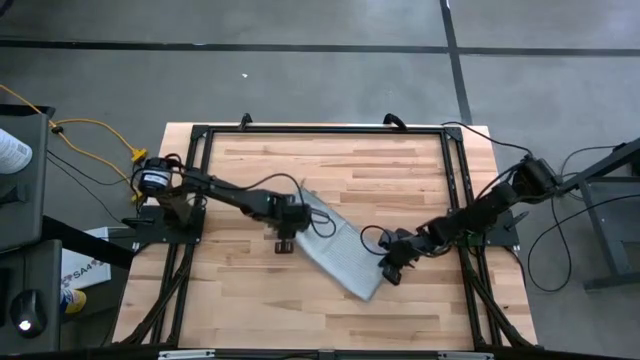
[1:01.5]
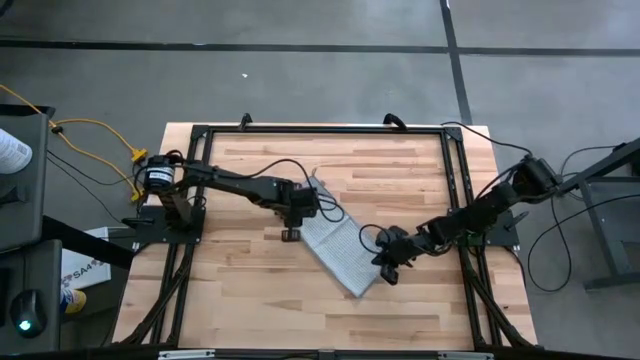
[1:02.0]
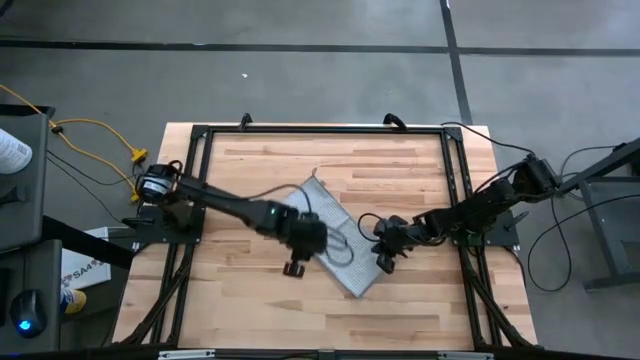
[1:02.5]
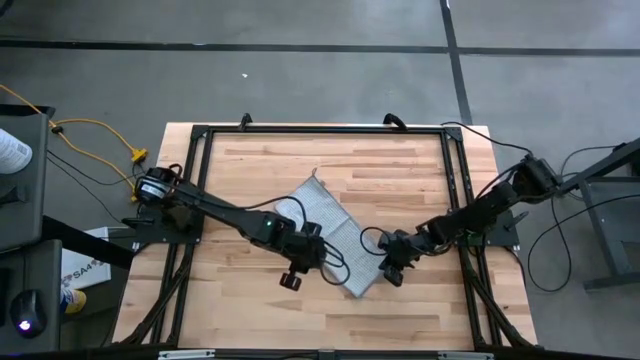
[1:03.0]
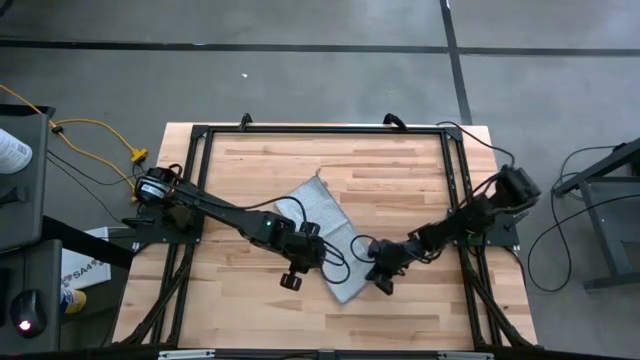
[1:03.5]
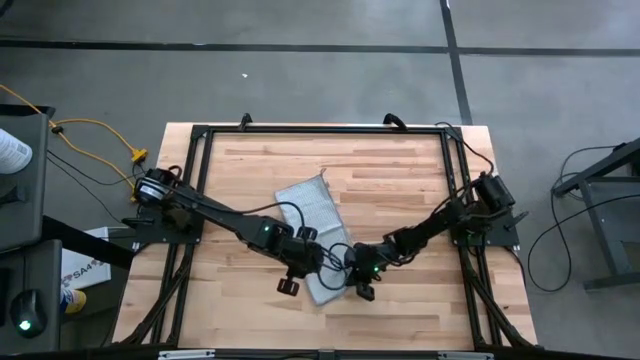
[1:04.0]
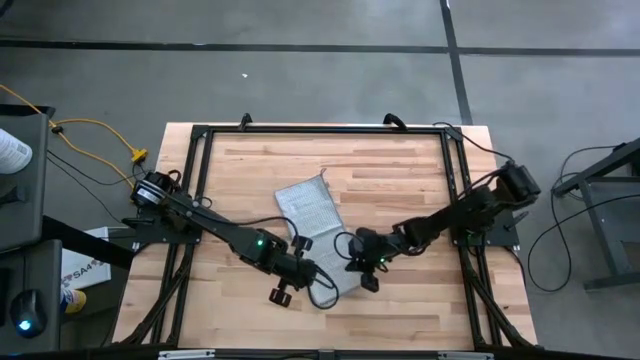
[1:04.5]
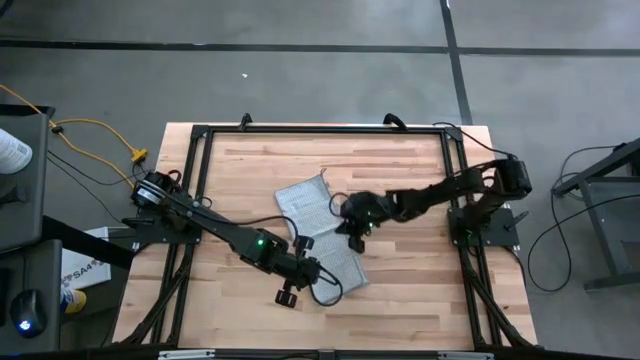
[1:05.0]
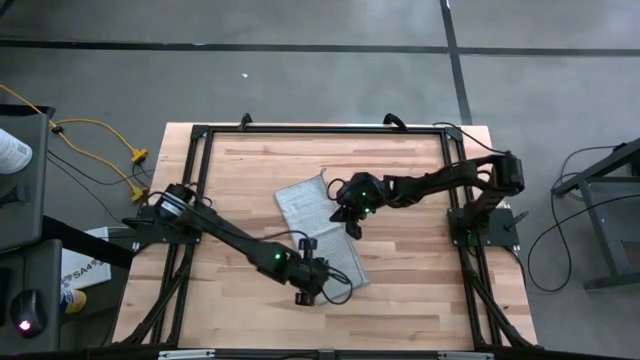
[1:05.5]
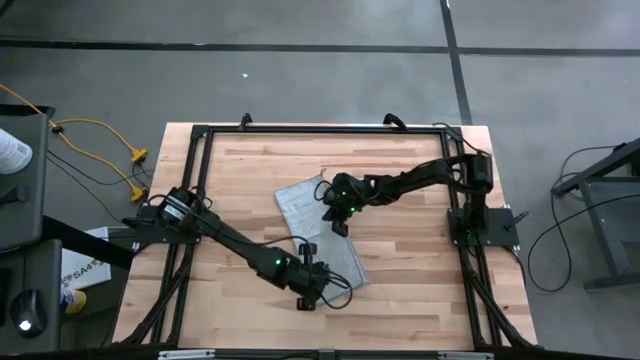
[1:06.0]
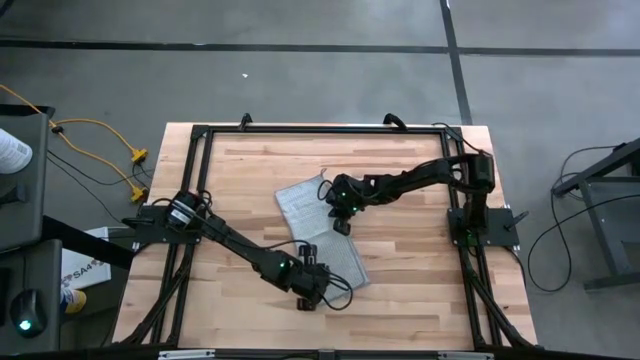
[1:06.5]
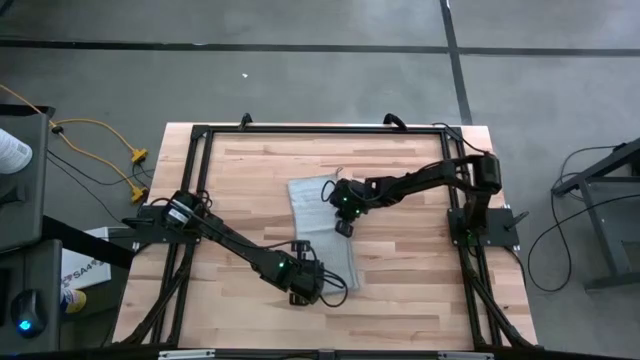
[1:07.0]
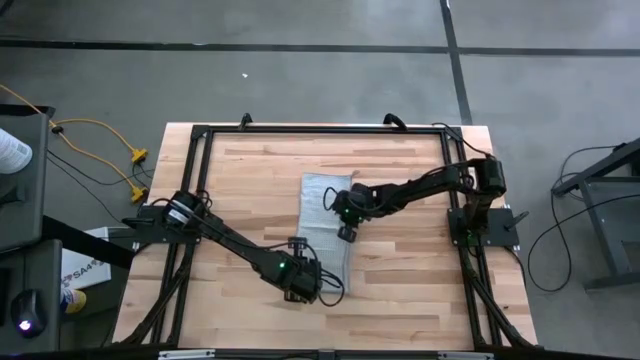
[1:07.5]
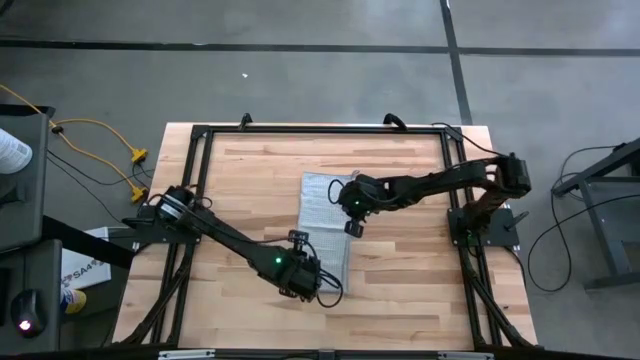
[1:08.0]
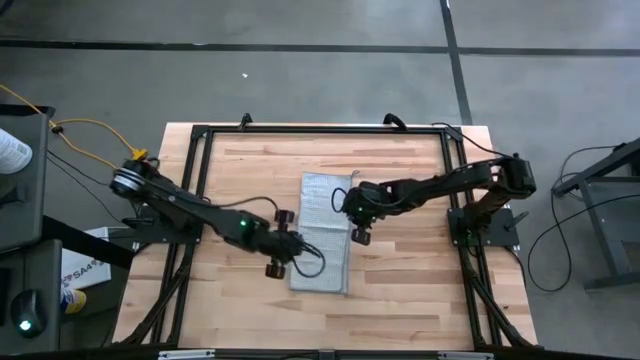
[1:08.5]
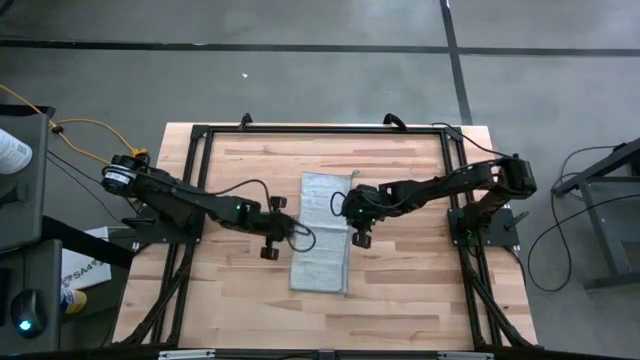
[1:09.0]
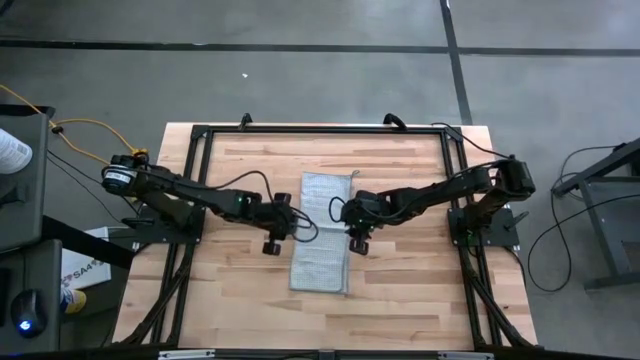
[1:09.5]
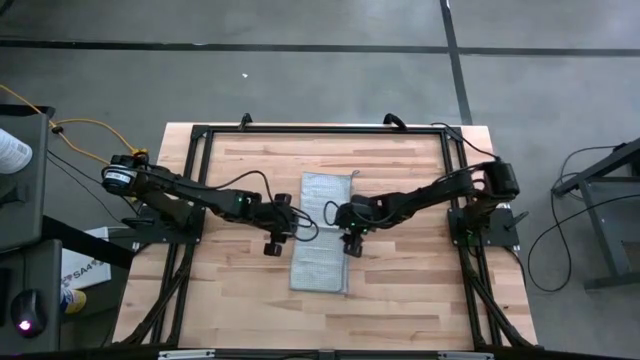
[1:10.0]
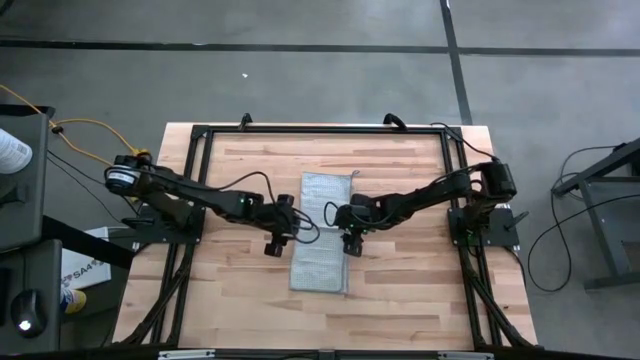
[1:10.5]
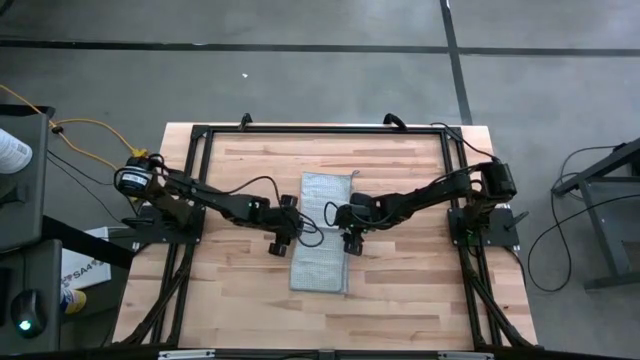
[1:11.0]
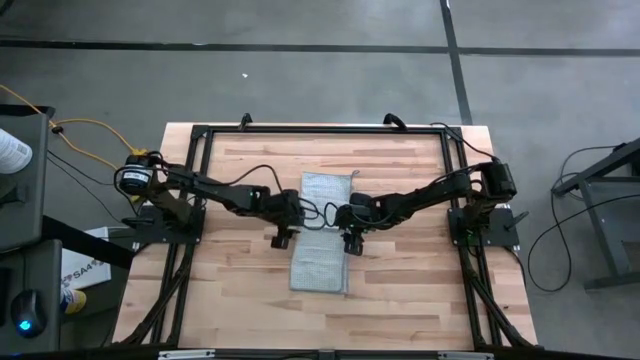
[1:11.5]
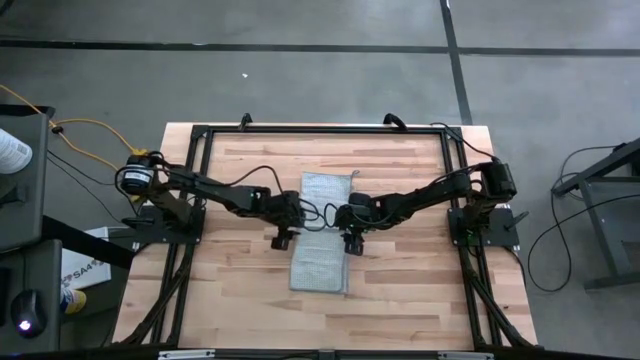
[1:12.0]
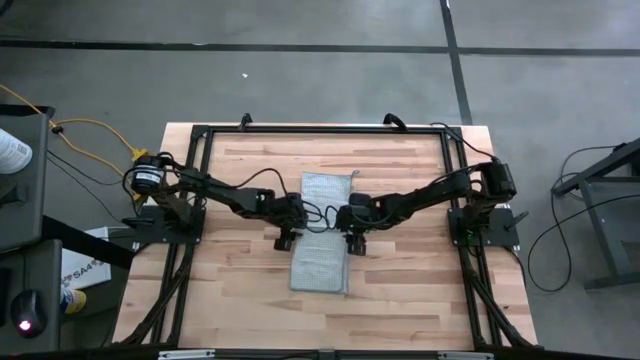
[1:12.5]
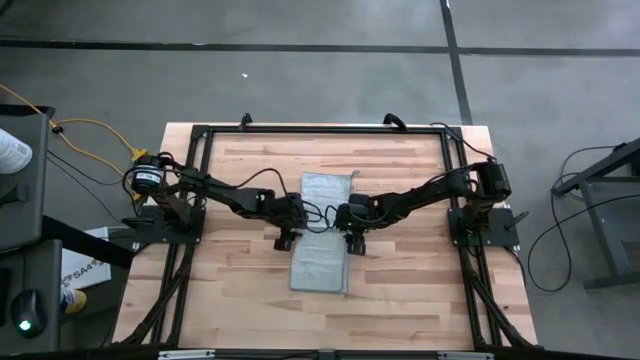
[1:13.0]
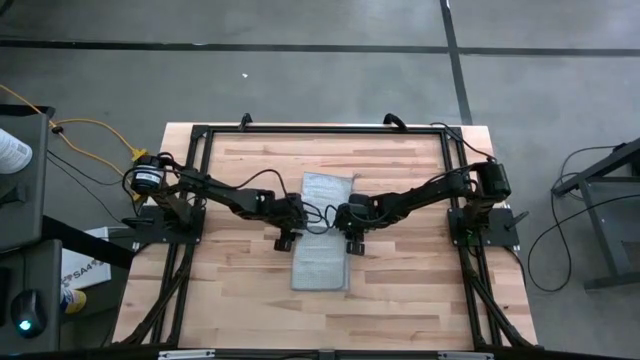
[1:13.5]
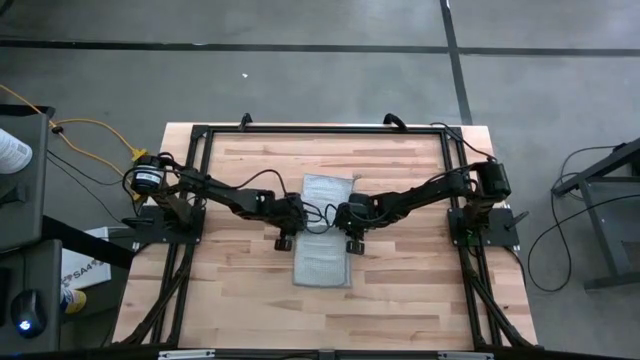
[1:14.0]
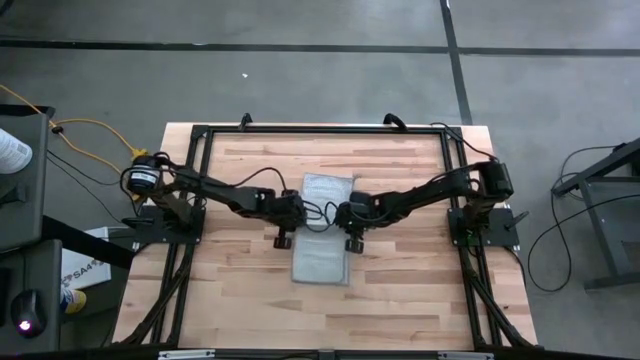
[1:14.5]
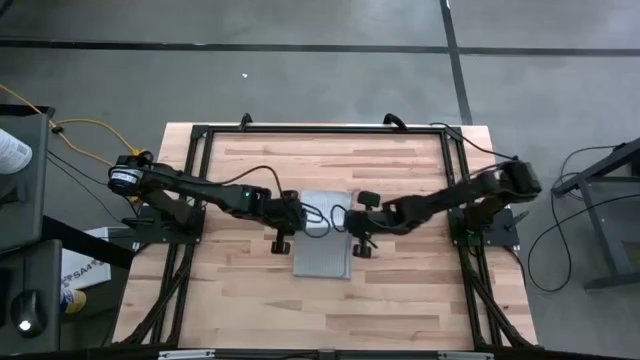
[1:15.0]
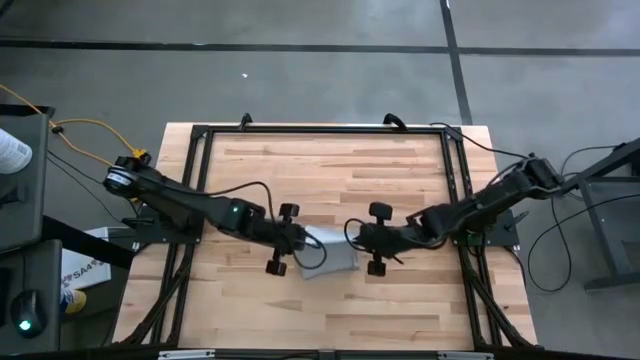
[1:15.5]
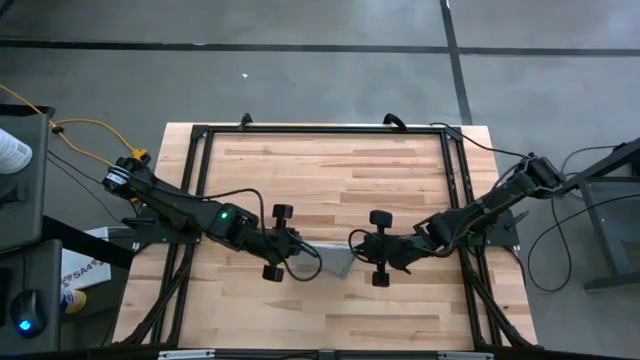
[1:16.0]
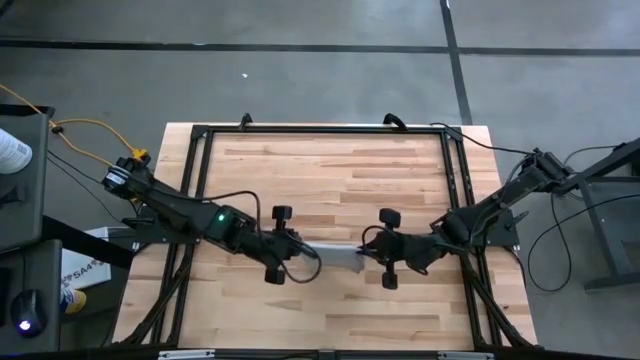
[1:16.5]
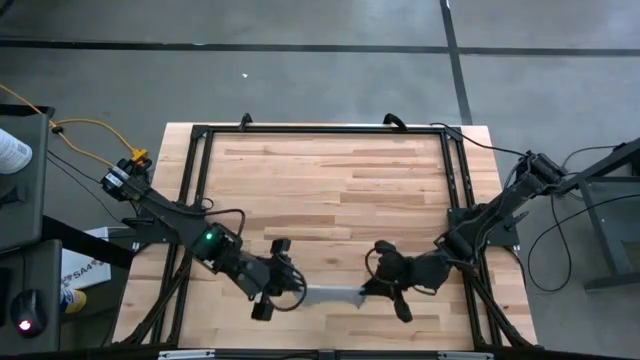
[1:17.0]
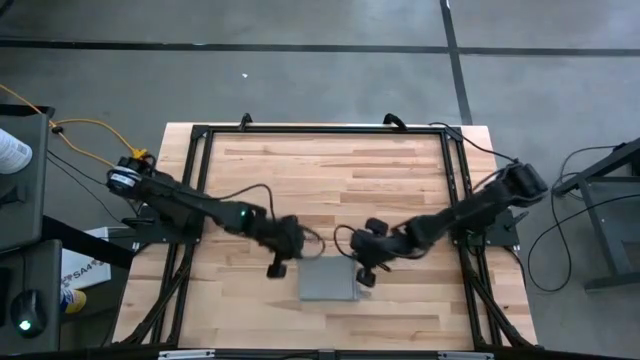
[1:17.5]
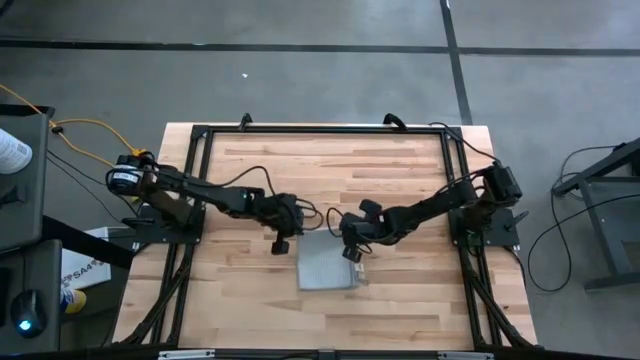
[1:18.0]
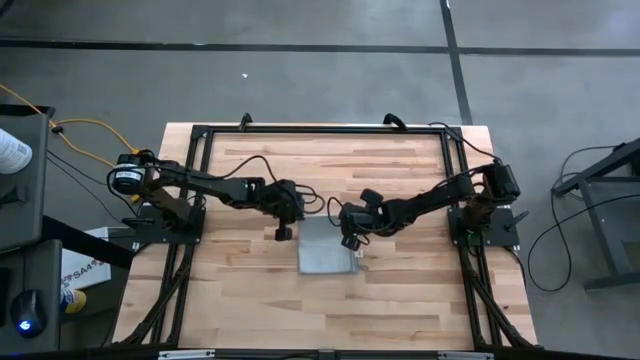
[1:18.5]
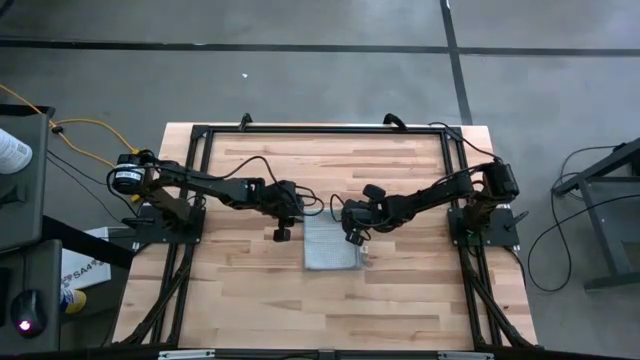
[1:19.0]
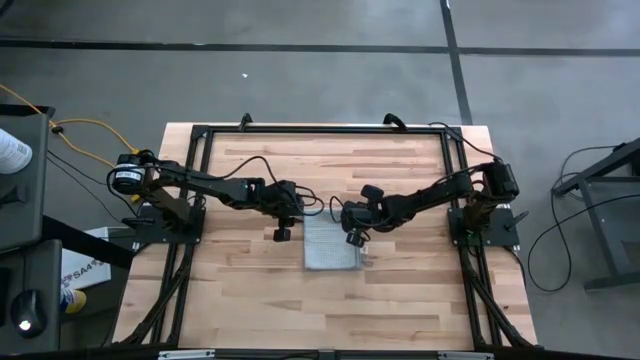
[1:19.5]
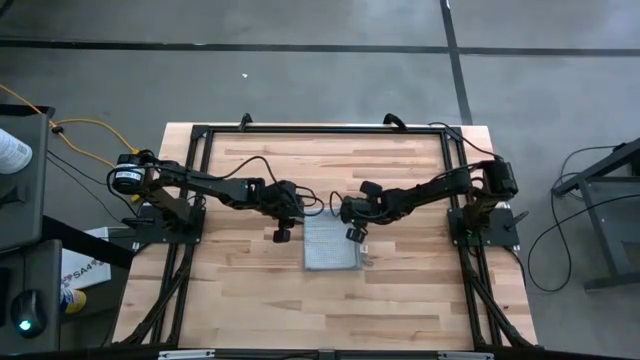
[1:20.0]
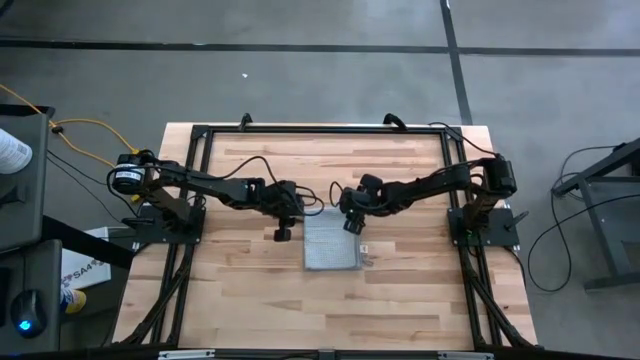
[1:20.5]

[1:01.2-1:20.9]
Task: Fold microfiber towels
Fold the grey towel

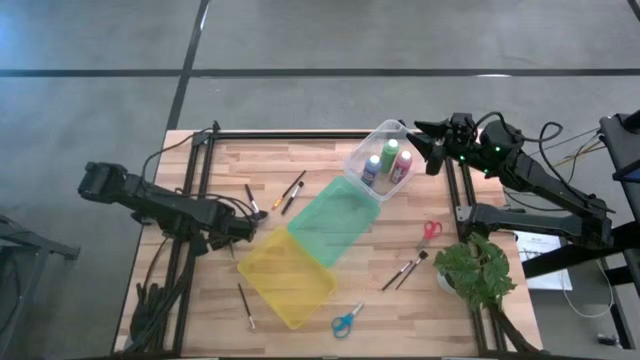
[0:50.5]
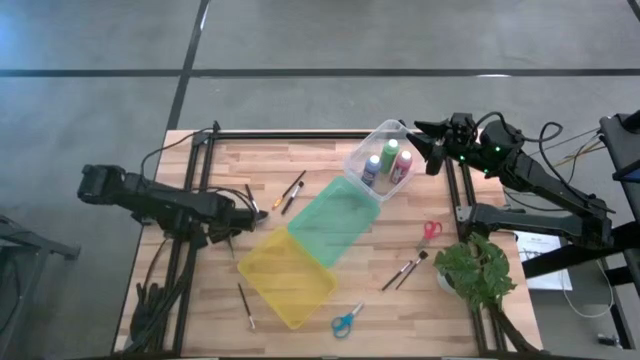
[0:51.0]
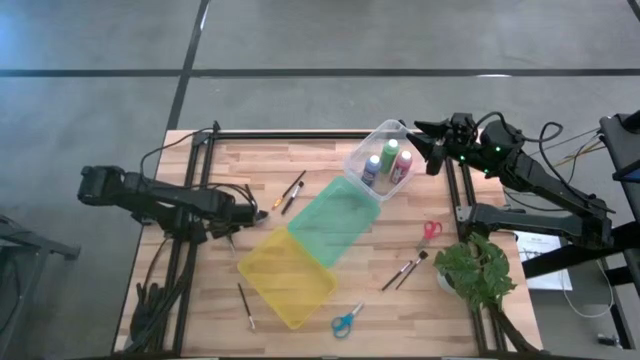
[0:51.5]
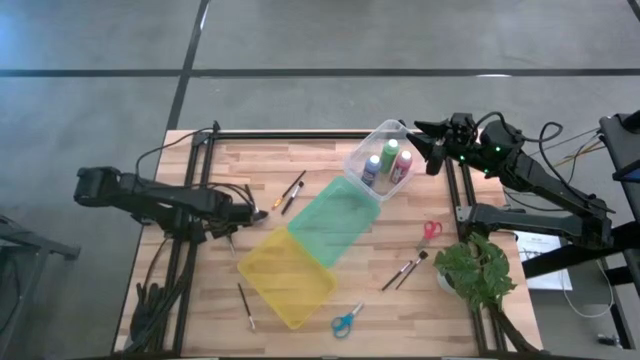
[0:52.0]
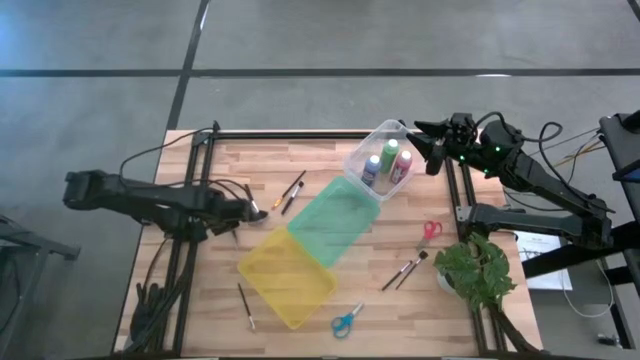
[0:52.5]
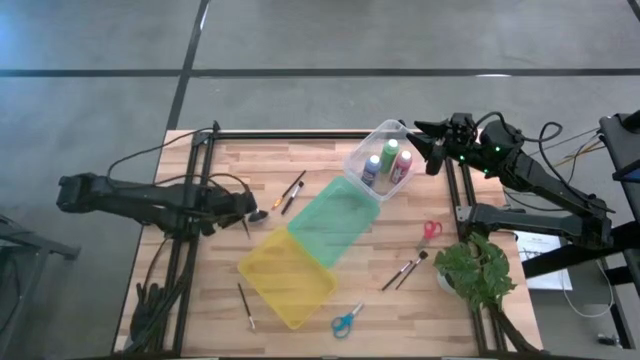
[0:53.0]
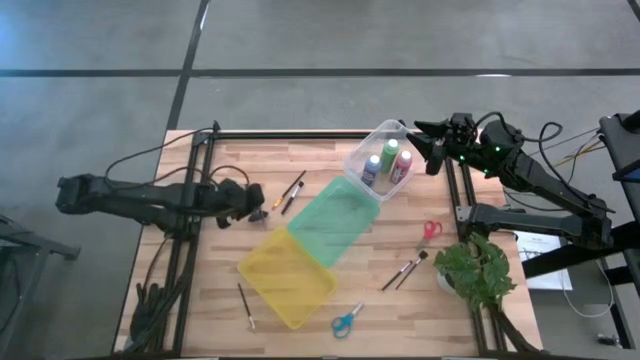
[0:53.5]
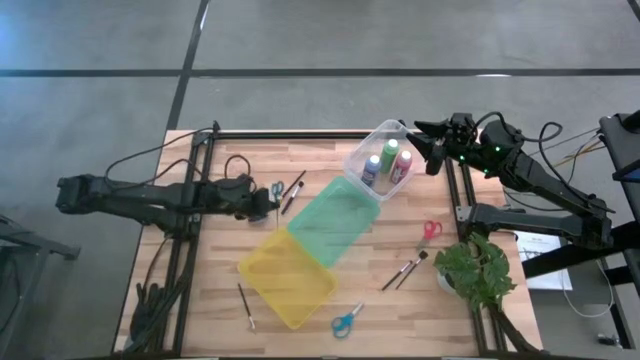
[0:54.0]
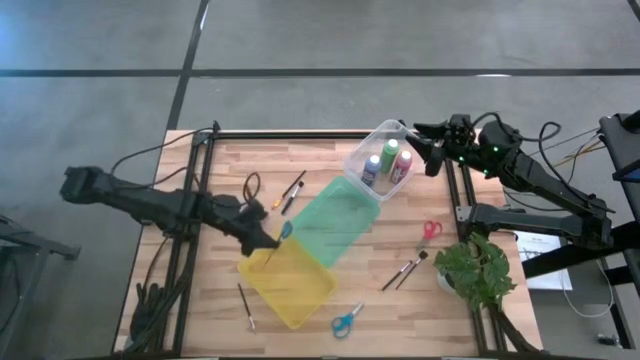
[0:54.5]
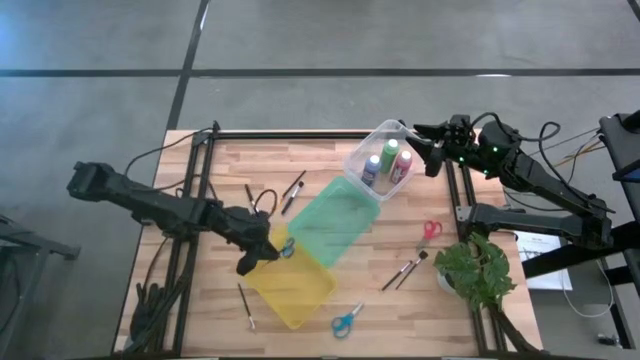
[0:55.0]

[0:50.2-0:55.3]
Task: Pick & Place Paint Supplies
Put the black and blue scissors into the yellow bin
